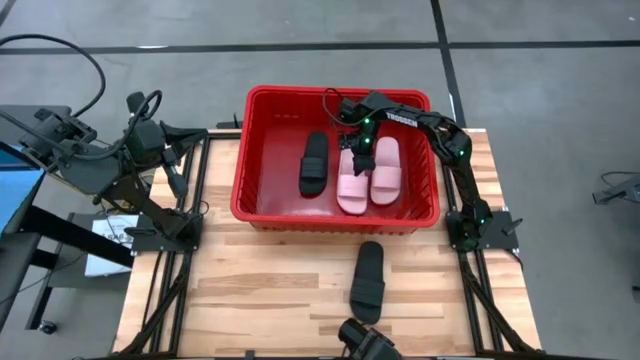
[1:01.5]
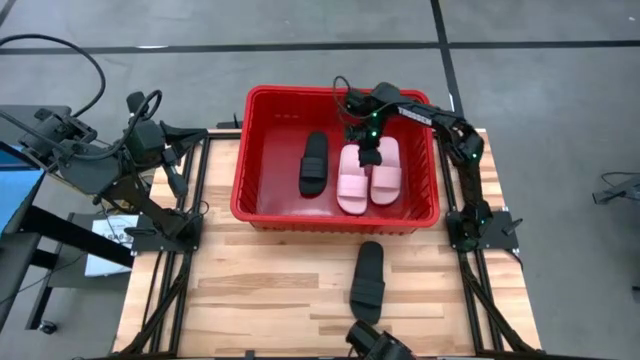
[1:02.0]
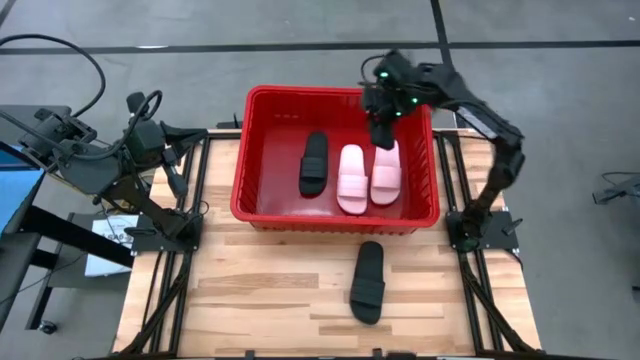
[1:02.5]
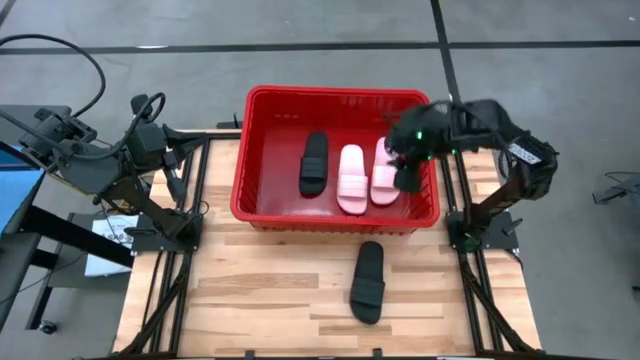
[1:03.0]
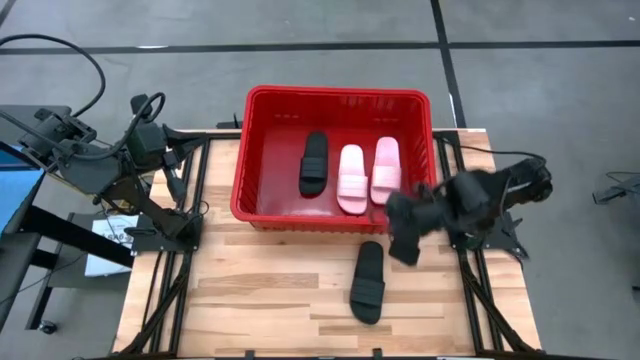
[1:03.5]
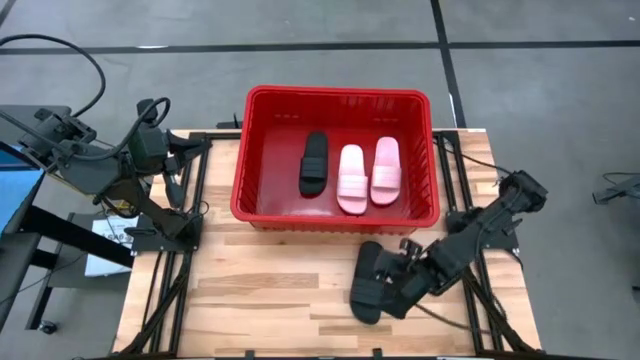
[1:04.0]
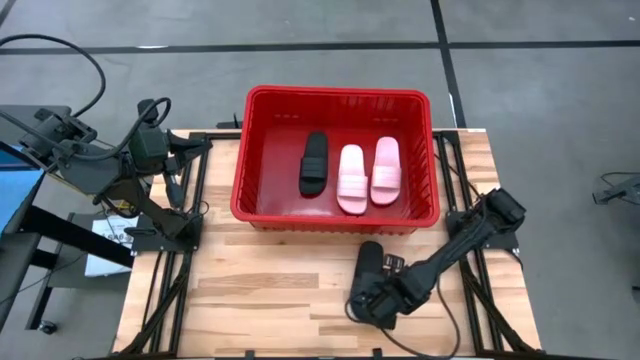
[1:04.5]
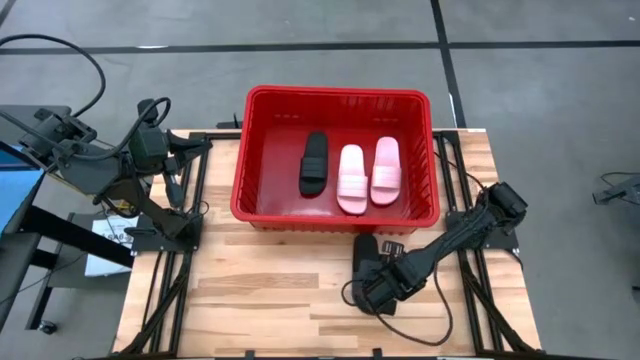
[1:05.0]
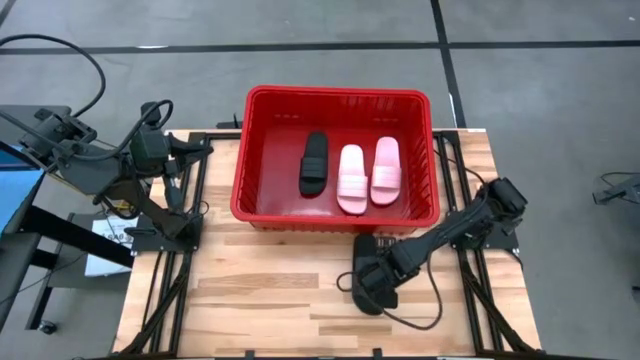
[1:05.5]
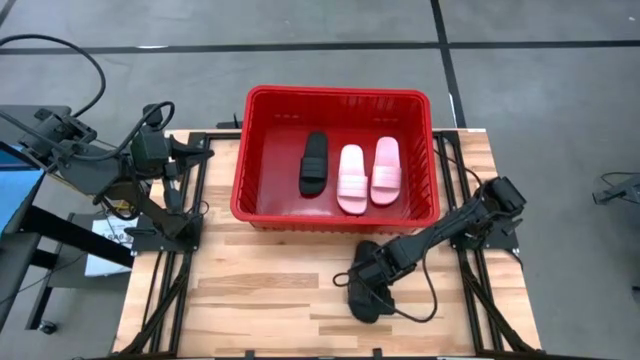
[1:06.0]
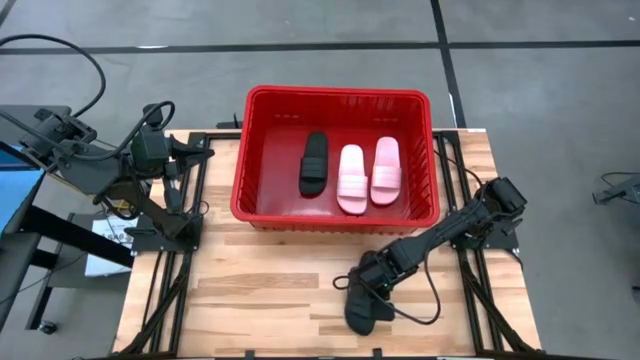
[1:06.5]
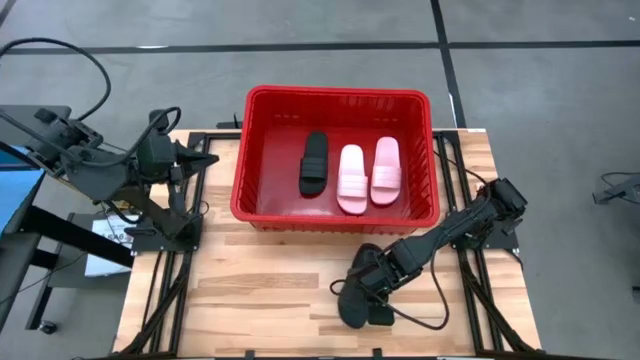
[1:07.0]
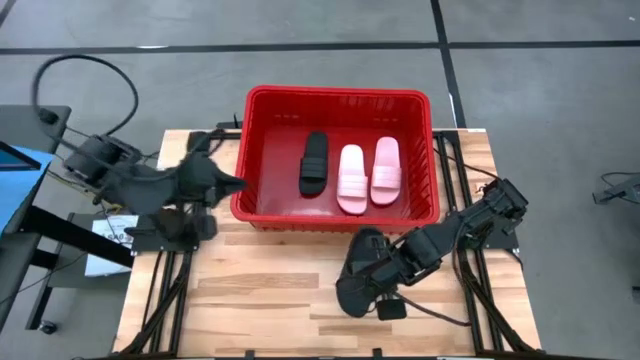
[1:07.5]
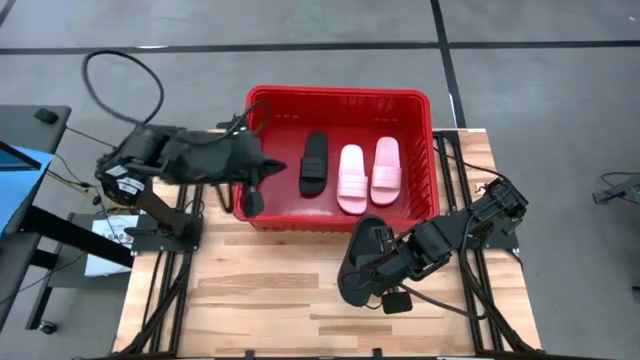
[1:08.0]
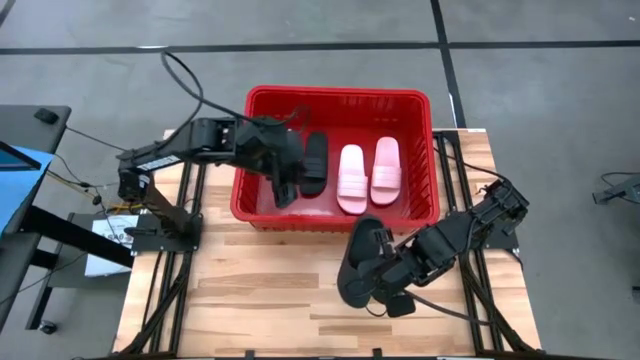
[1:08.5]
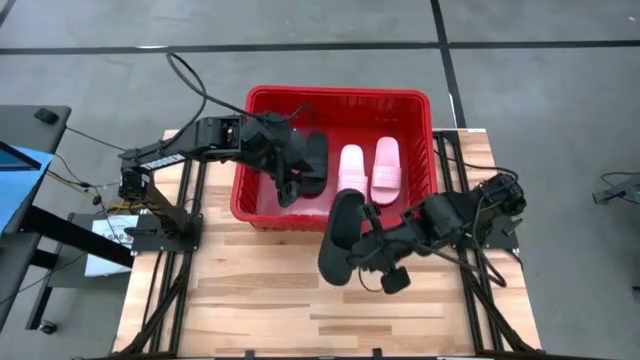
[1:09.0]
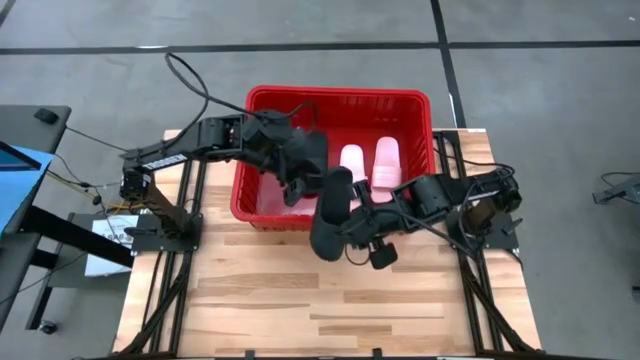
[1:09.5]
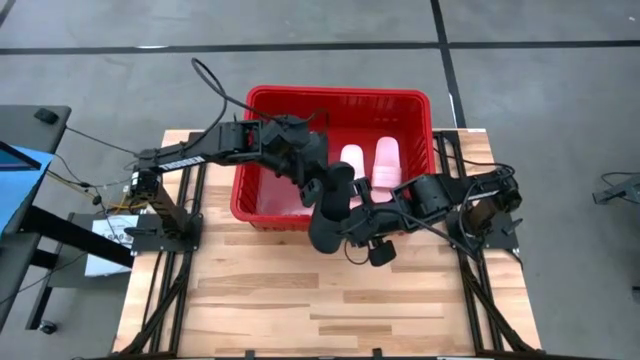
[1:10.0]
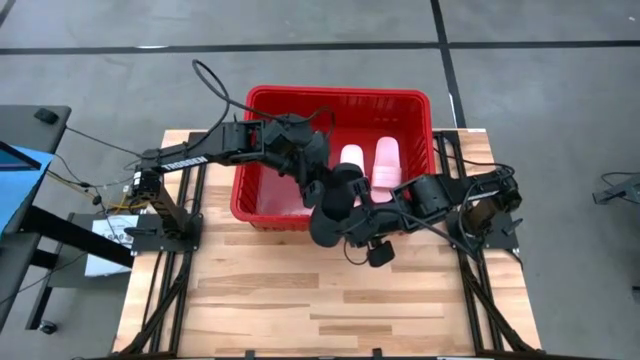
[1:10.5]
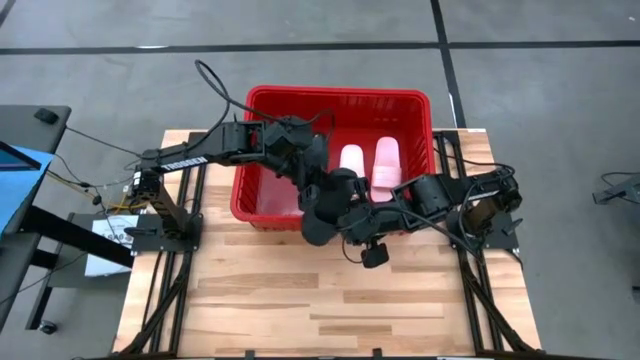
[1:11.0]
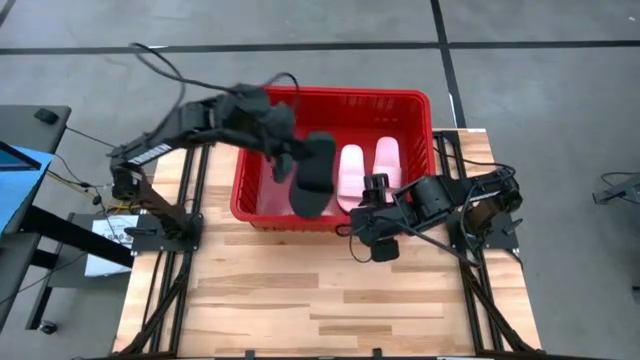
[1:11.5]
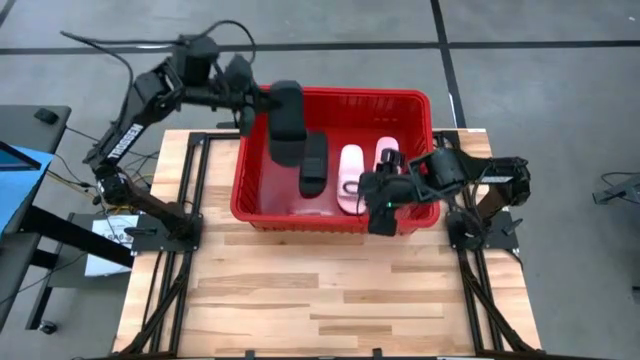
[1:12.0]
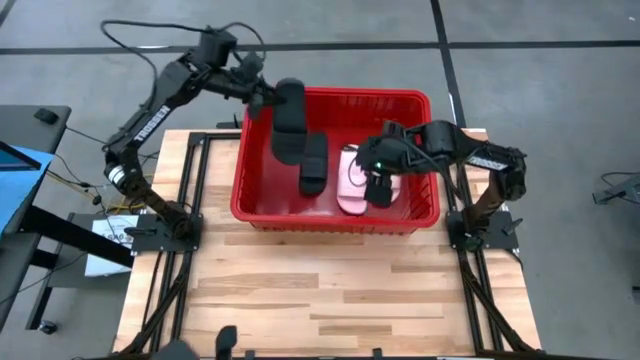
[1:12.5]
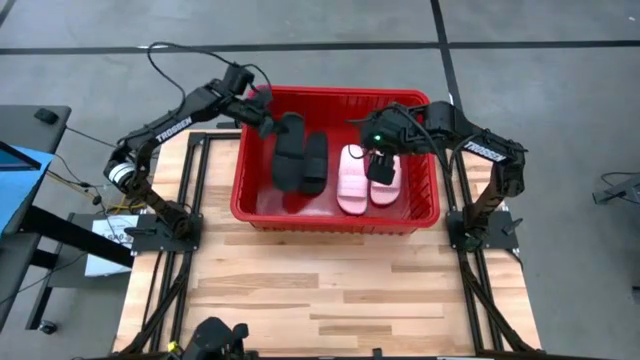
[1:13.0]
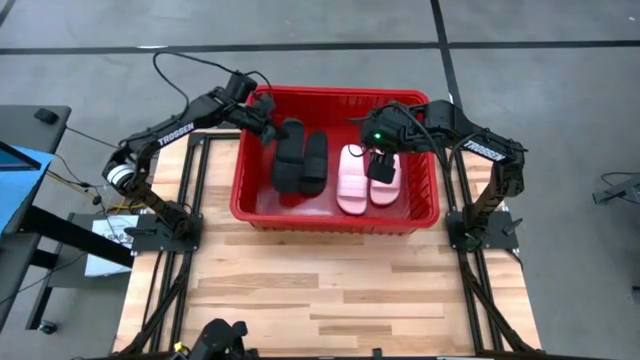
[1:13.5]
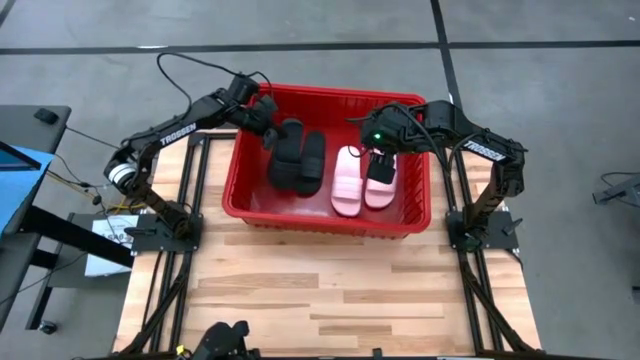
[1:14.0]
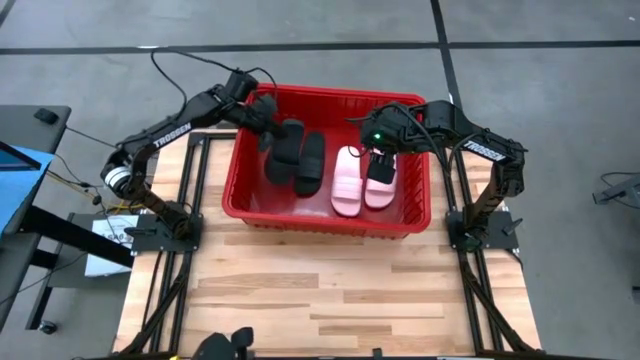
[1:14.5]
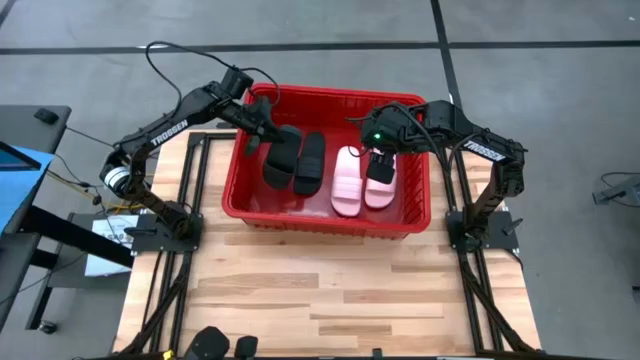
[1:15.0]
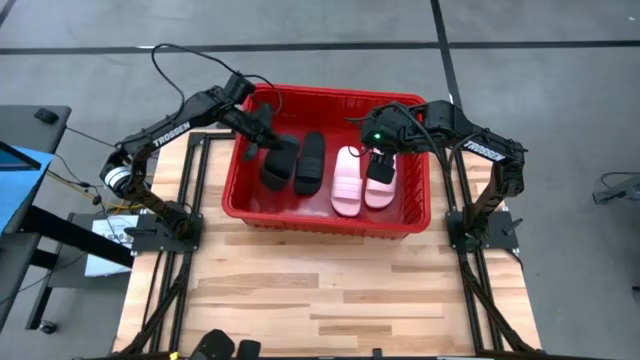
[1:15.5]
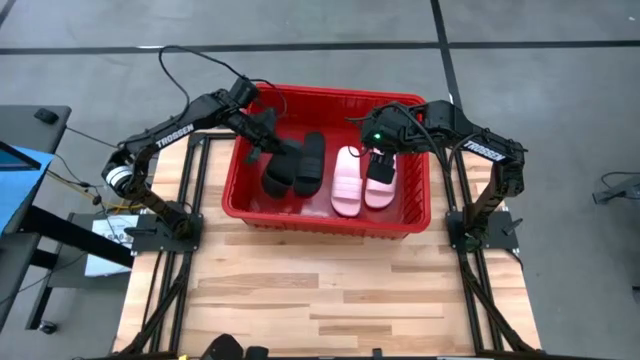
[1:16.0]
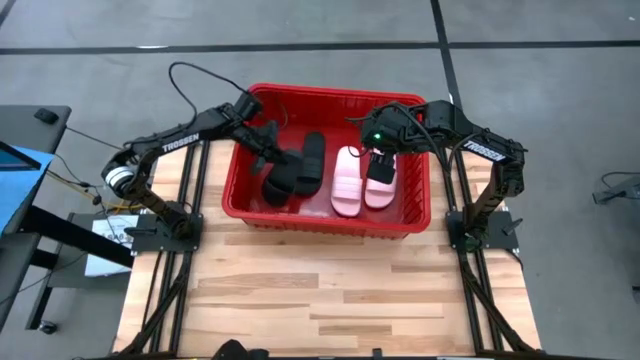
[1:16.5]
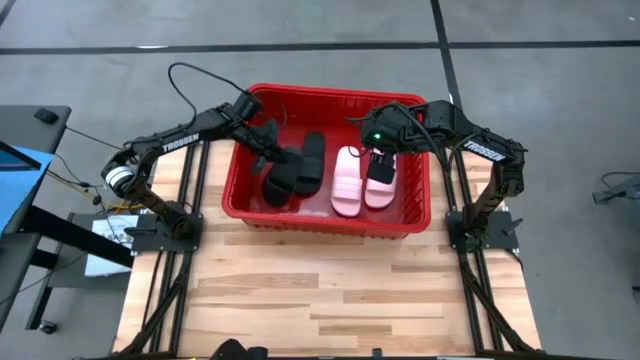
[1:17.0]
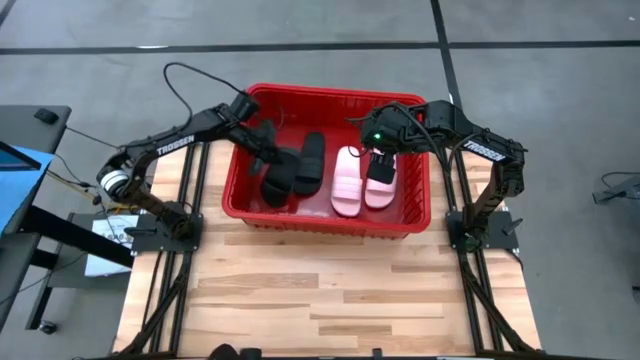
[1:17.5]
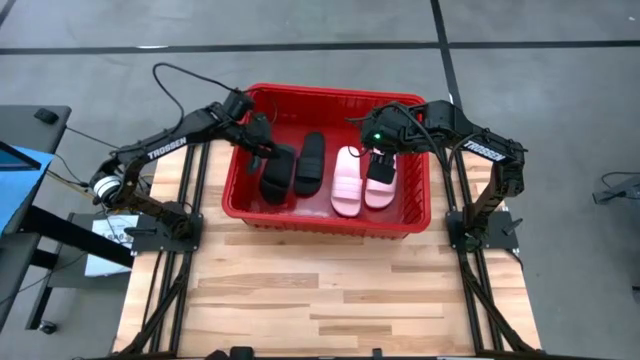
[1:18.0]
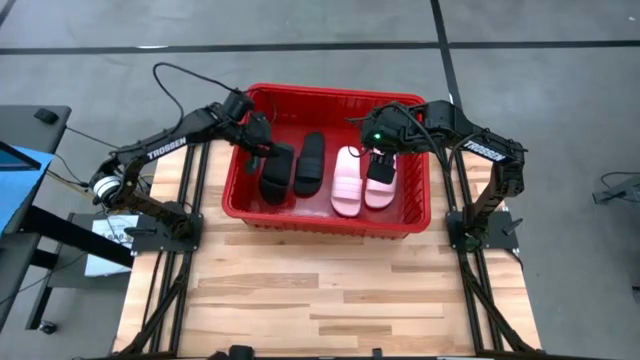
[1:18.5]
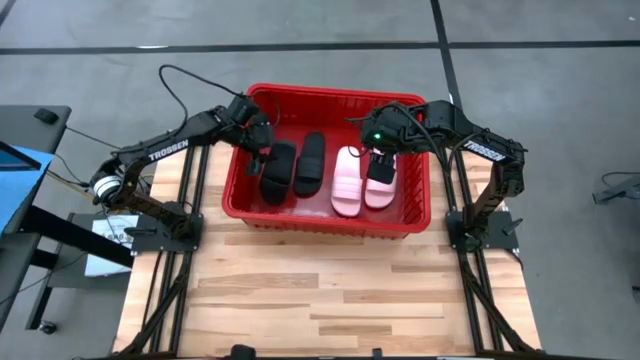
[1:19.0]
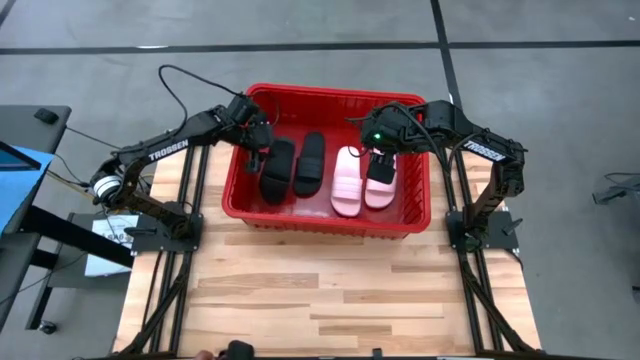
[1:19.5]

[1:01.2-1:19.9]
Task: Pick and place slides into bin
Put the black slide into the red container
